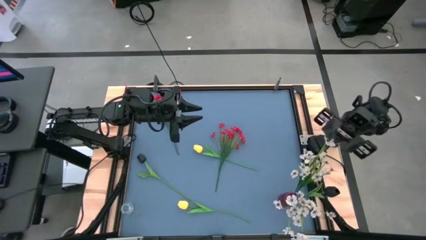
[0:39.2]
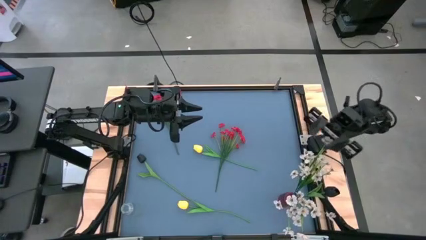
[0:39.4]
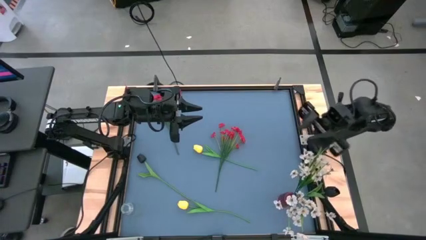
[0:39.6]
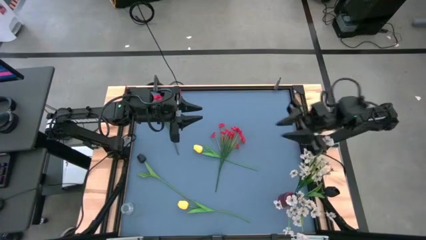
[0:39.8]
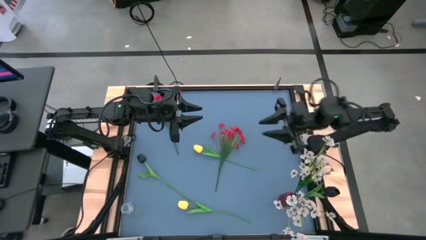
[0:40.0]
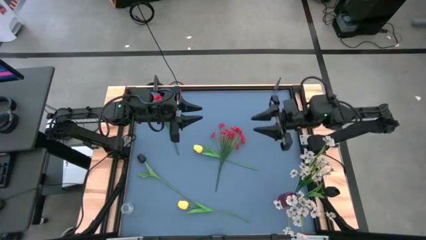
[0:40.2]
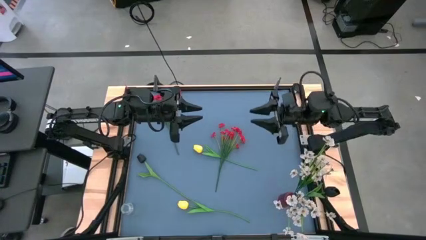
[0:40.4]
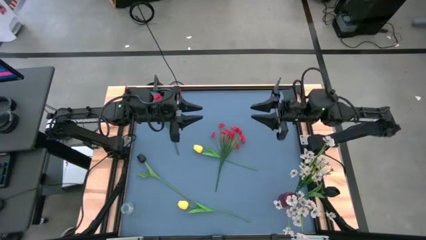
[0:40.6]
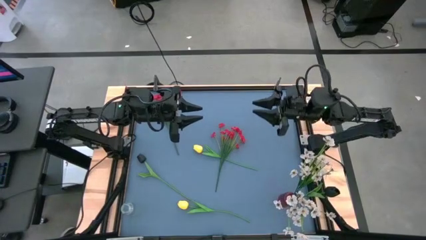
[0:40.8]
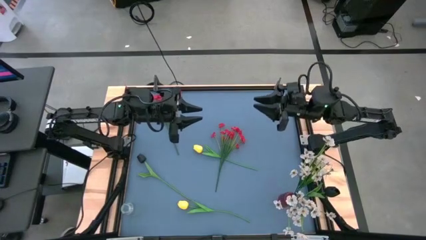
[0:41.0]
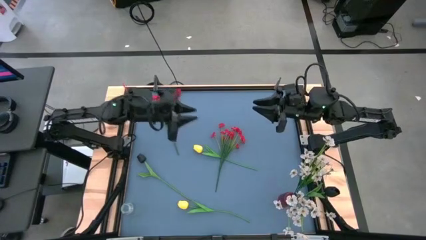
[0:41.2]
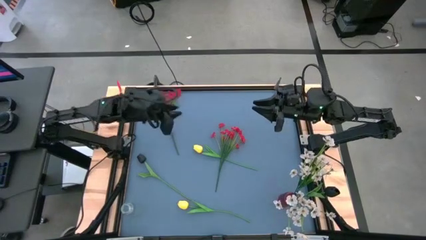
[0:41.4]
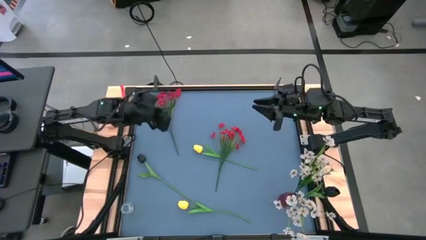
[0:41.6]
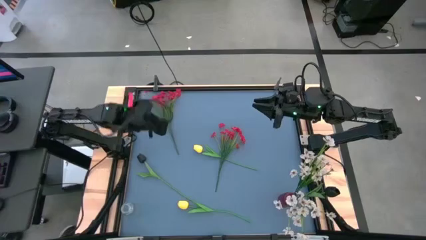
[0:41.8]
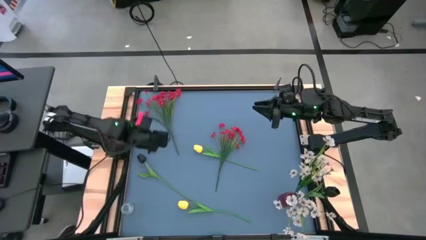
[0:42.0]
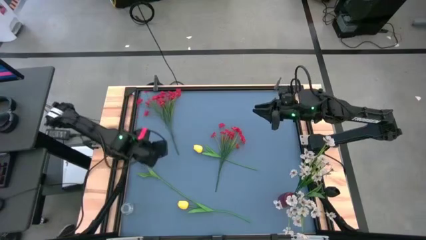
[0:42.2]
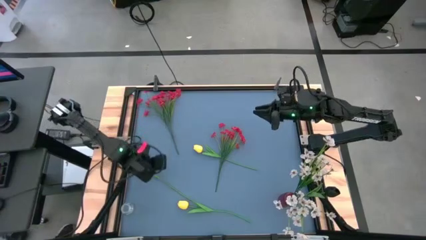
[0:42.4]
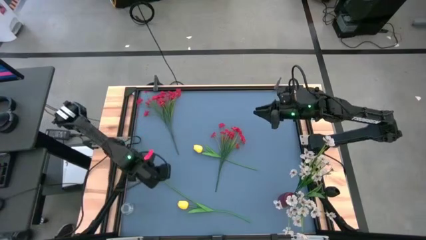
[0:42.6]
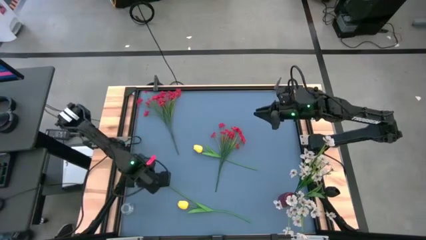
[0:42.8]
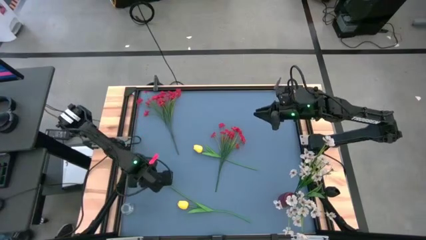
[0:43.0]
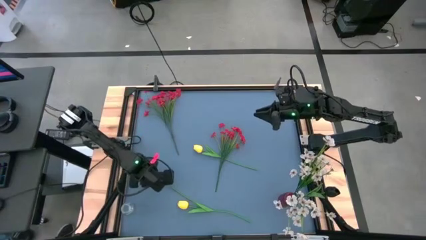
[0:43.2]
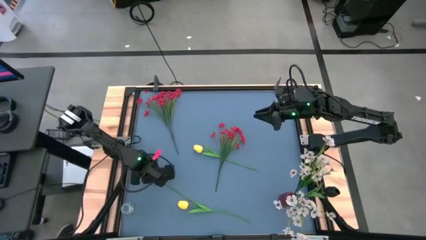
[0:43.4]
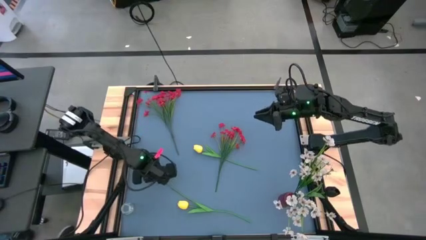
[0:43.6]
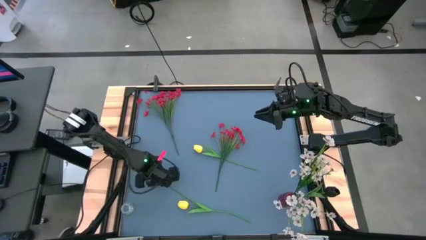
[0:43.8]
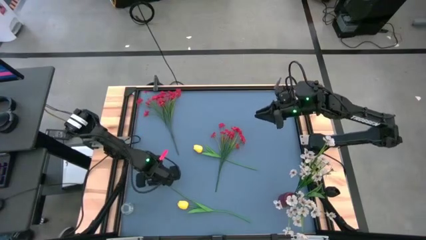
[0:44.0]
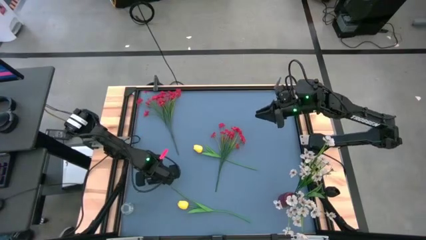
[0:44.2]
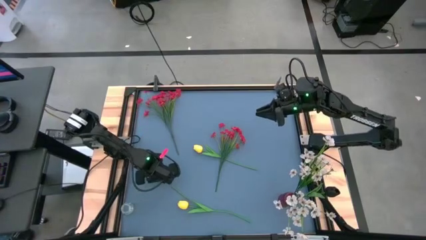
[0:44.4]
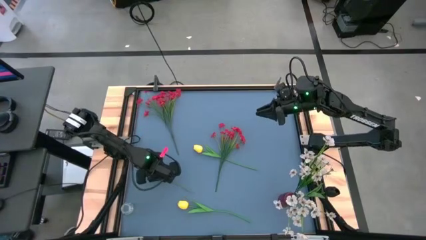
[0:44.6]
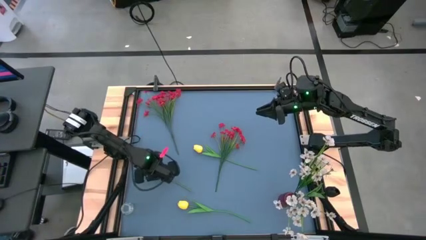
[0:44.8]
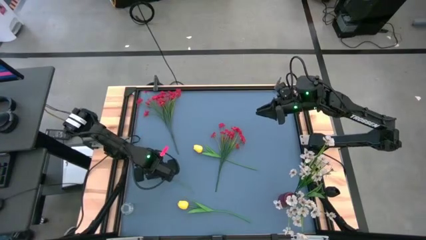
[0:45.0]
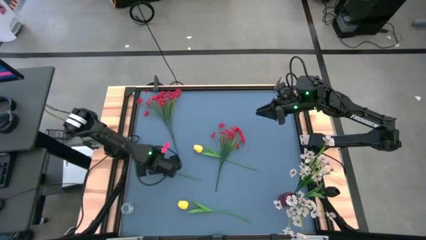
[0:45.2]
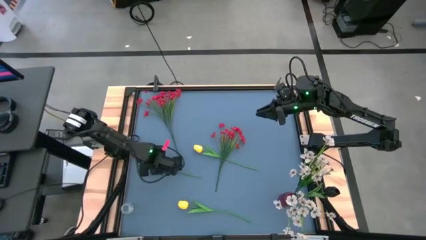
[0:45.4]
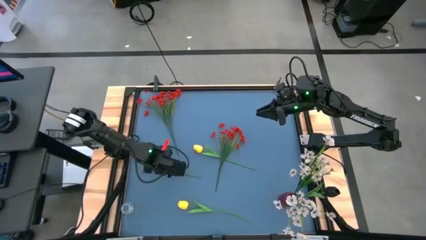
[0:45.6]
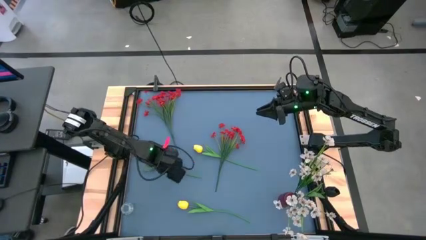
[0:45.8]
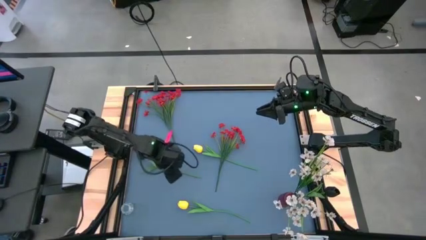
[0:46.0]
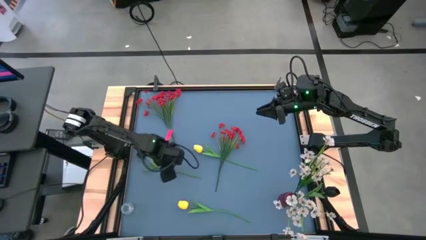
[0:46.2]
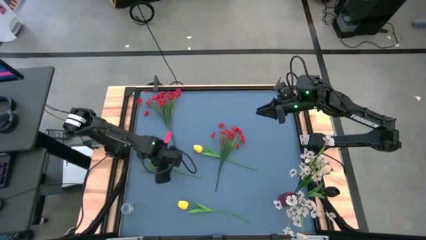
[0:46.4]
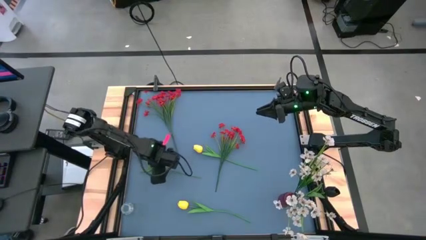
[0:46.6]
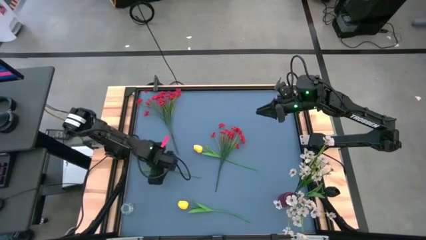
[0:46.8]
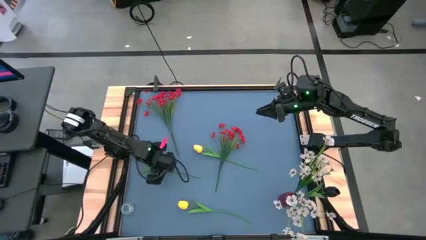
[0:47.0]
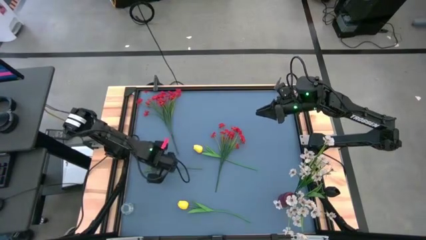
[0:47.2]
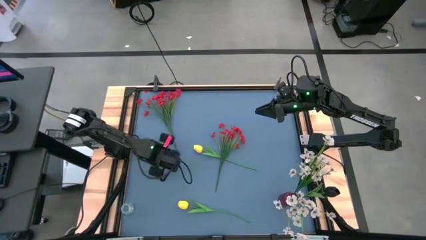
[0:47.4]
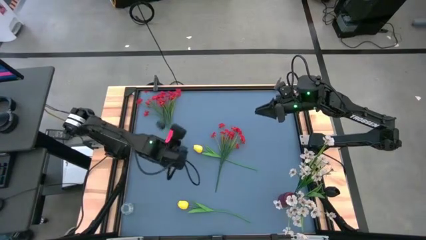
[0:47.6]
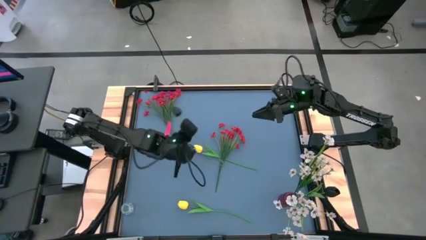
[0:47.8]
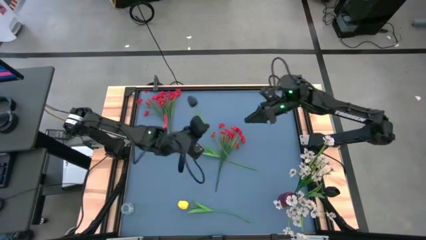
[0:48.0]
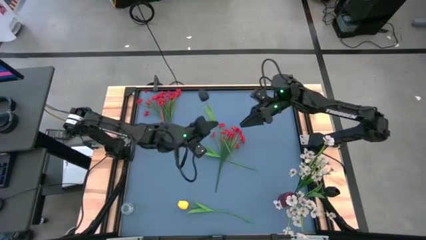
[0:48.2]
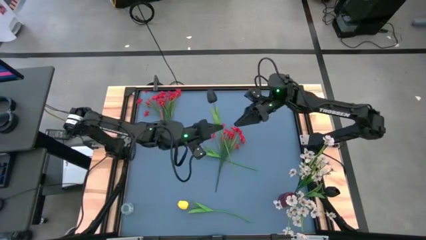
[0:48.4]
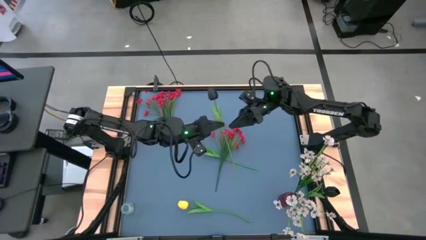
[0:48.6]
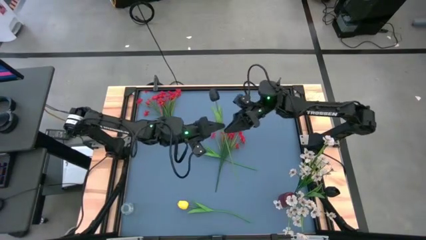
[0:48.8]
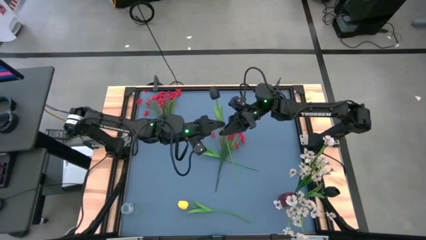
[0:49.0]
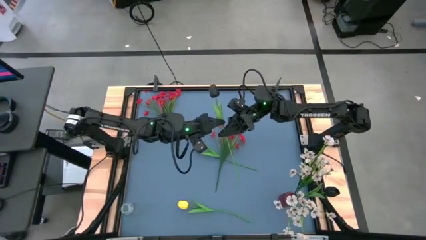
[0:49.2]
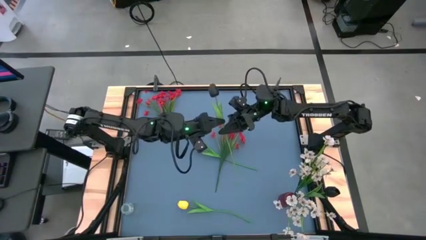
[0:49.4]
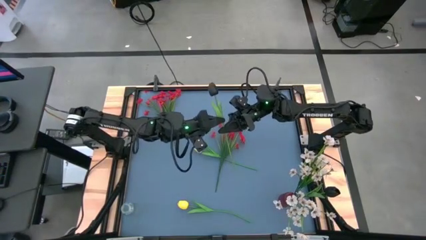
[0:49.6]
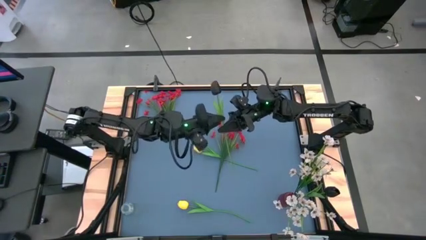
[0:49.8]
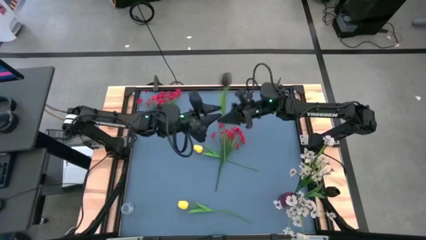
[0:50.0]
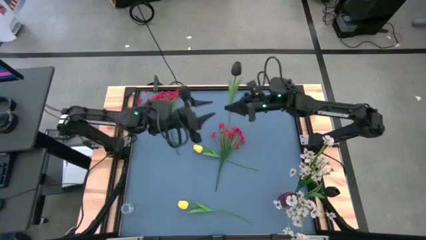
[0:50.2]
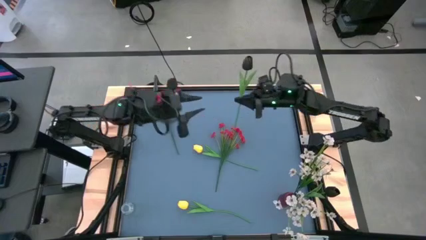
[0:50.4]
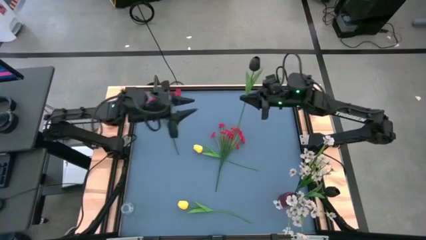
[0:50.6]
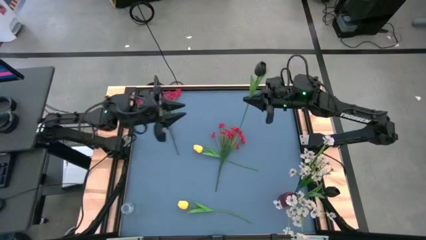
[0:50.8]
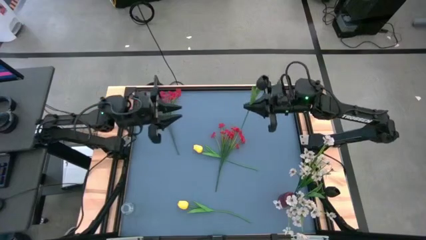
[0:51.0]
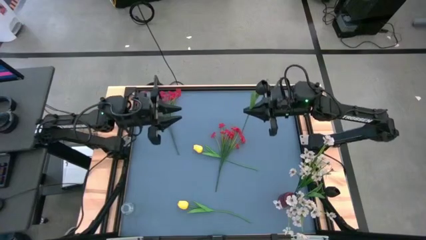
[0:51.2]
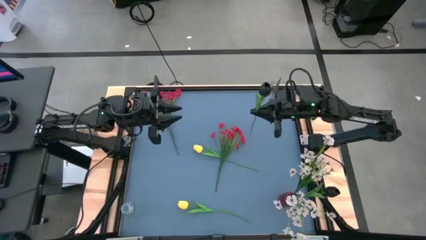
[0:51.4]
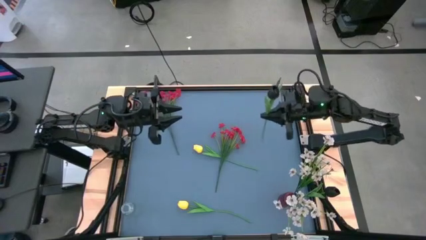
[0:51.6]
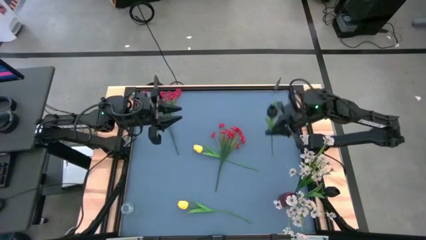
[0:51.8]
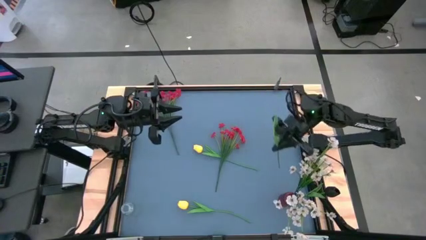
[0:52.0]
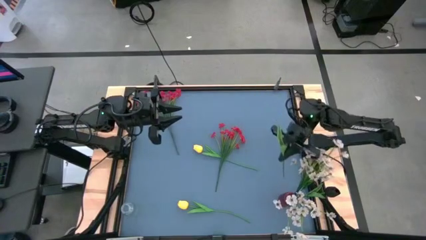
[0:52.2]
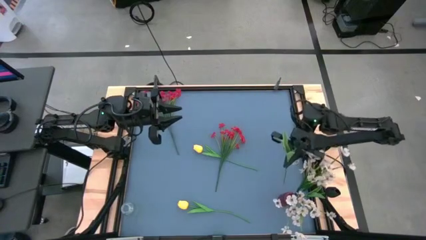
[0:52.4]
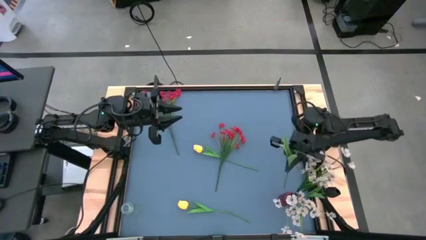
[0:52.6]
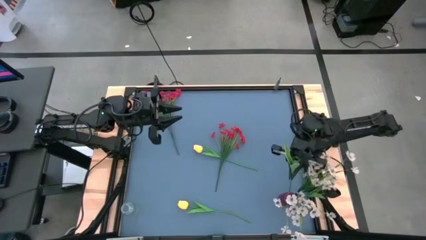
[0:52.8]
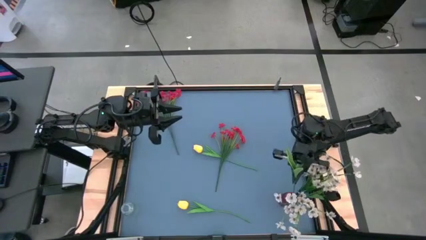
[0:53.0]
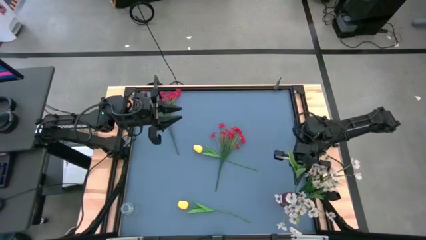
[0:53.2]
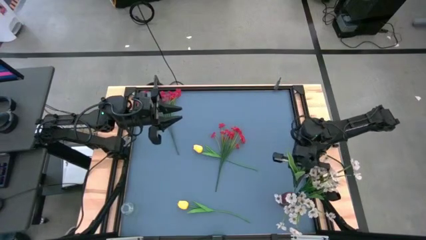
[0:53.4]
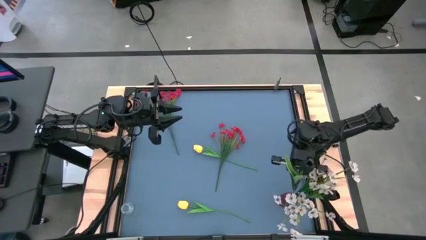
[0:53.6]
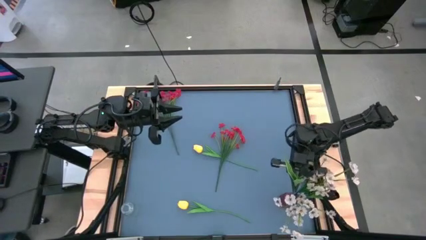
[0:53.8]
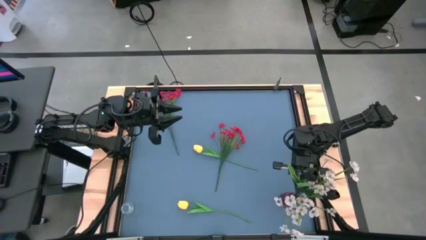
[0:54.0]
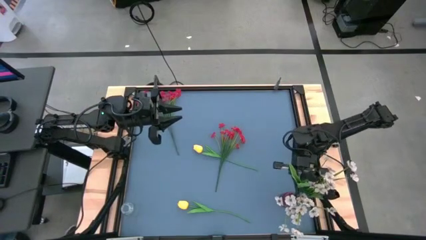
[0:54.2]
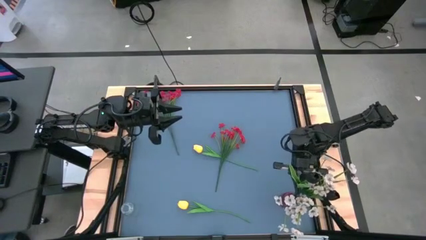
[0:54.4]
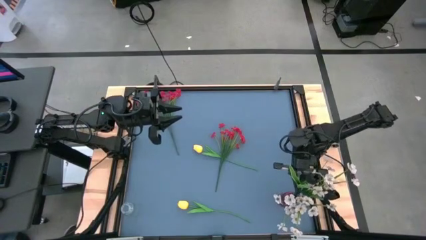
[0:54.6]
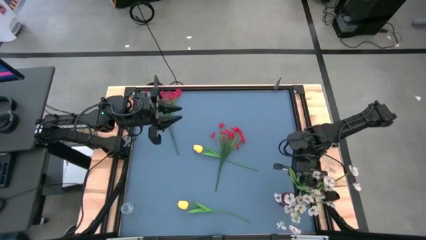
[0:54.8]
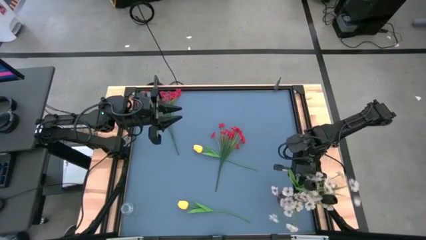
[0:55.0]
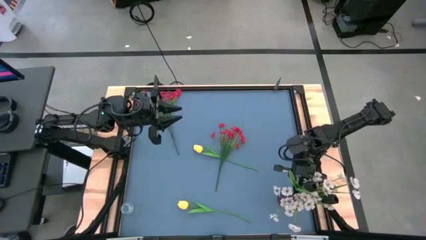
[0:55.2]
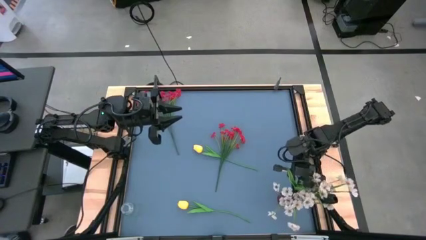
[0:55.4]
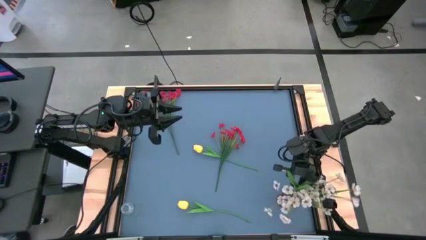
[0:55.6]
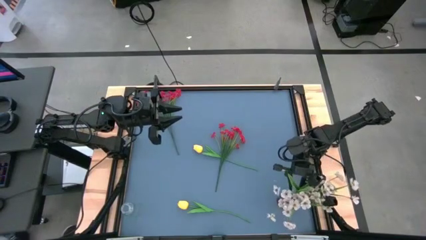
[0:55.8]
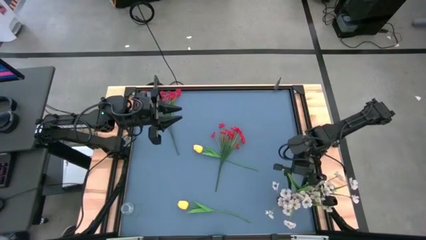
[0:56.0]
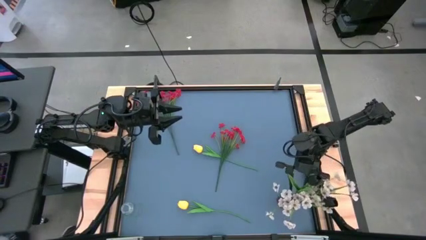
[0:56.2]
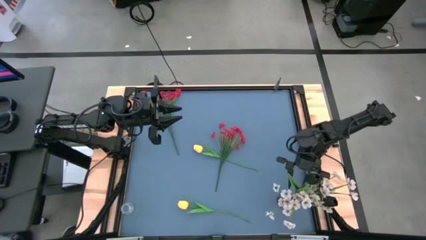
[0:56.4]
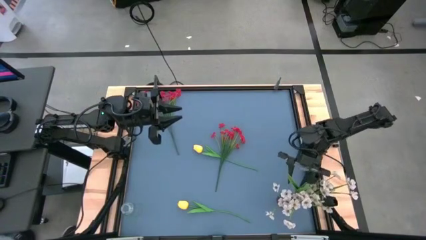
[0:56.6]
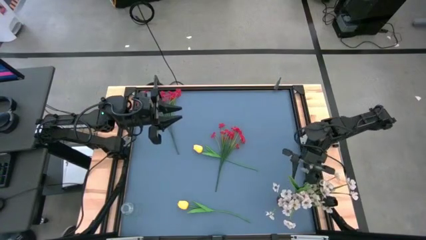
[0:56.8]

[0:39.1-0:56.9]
Task: Sort flowers into vase by color
Put the black tulip into the red vase
